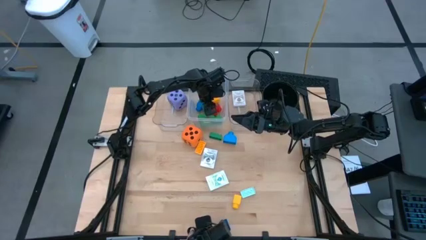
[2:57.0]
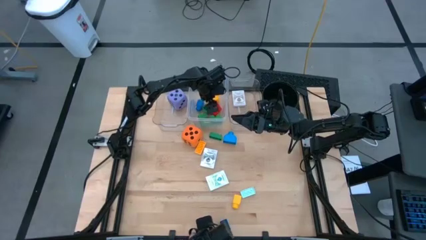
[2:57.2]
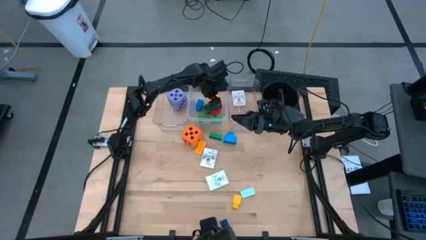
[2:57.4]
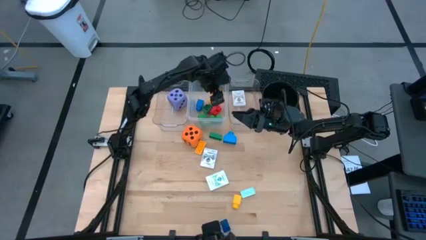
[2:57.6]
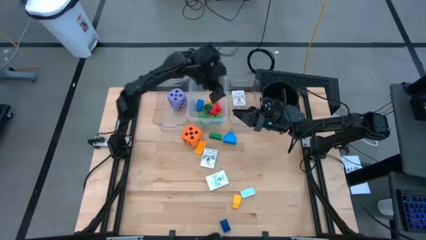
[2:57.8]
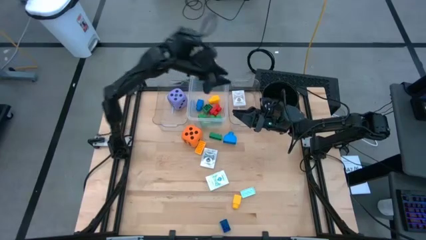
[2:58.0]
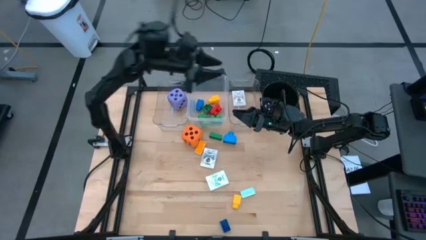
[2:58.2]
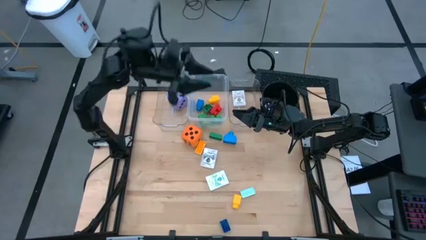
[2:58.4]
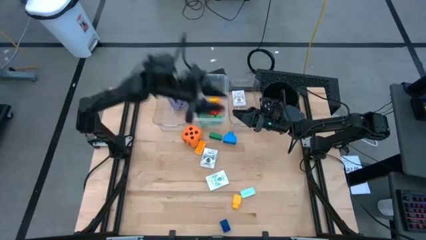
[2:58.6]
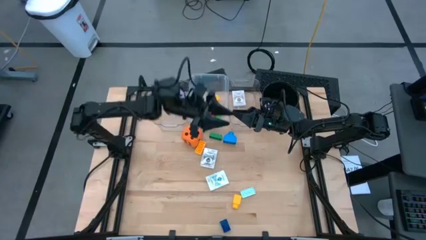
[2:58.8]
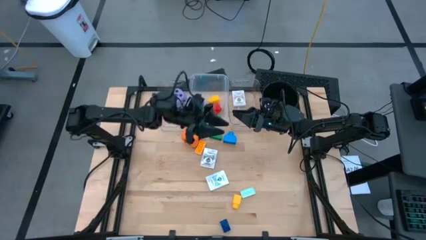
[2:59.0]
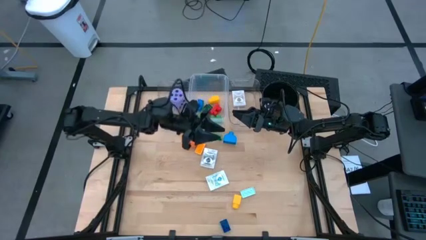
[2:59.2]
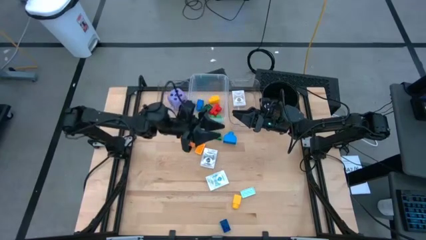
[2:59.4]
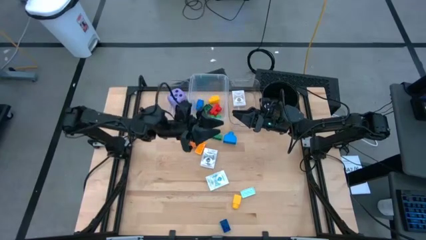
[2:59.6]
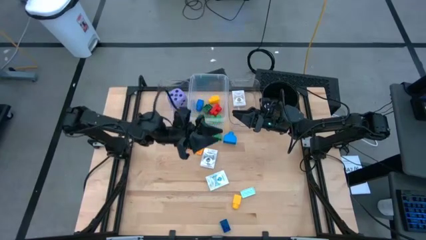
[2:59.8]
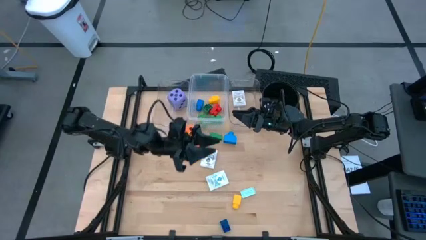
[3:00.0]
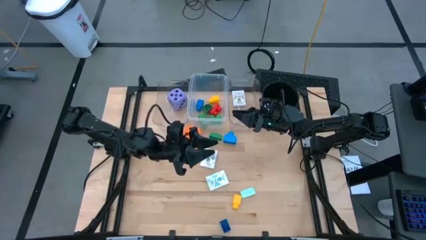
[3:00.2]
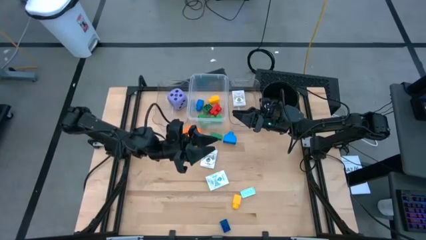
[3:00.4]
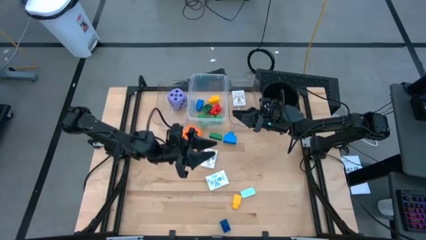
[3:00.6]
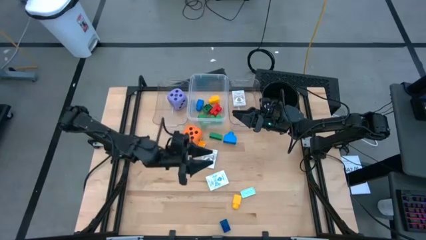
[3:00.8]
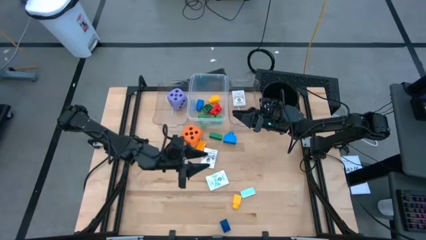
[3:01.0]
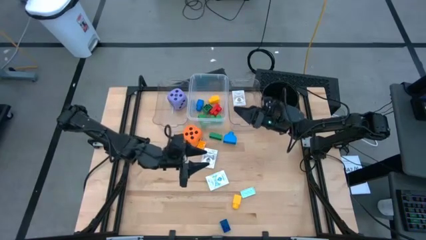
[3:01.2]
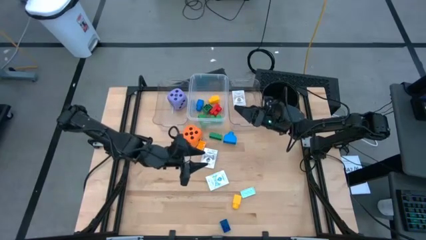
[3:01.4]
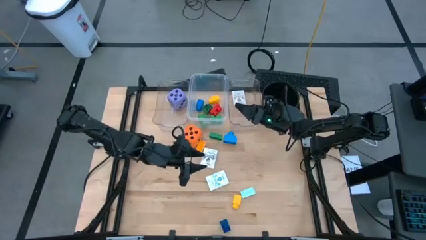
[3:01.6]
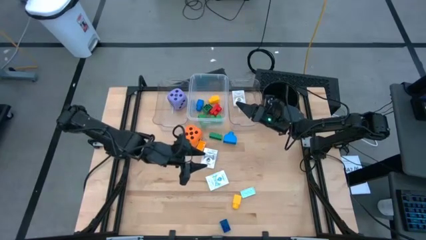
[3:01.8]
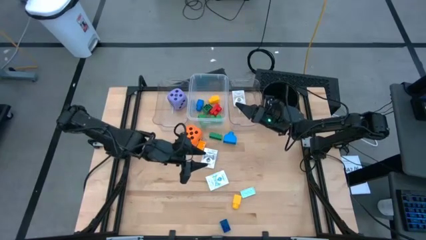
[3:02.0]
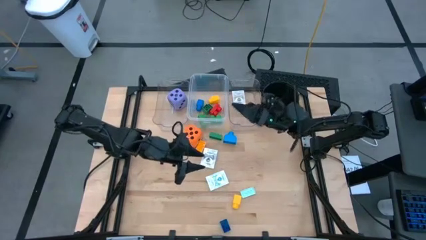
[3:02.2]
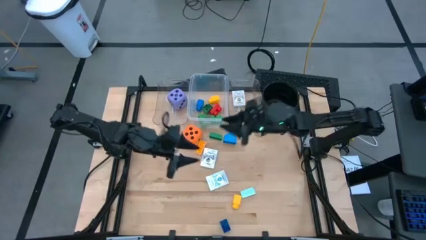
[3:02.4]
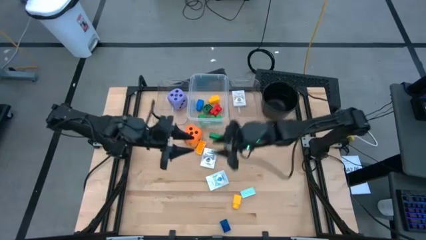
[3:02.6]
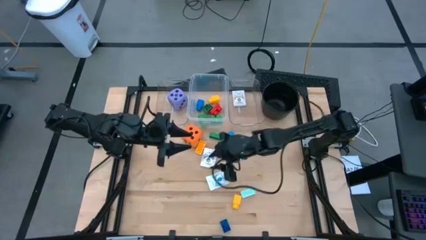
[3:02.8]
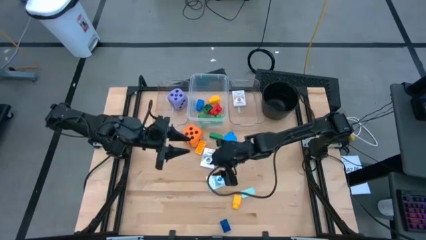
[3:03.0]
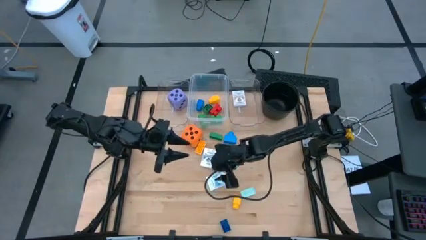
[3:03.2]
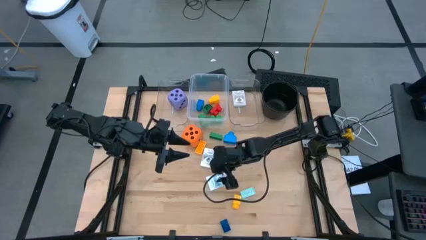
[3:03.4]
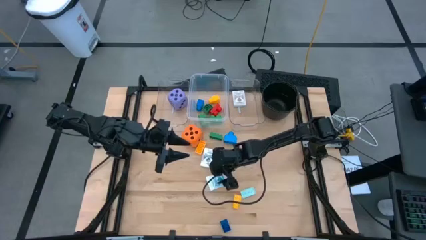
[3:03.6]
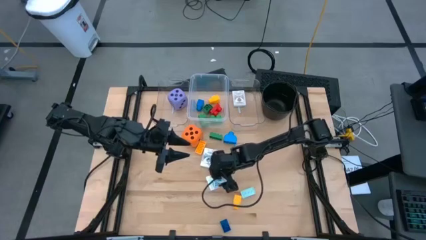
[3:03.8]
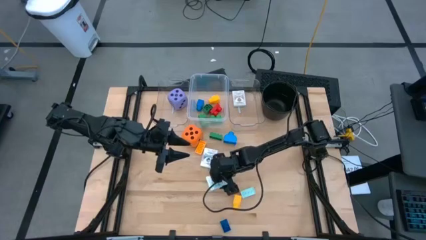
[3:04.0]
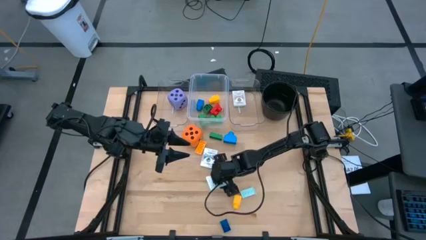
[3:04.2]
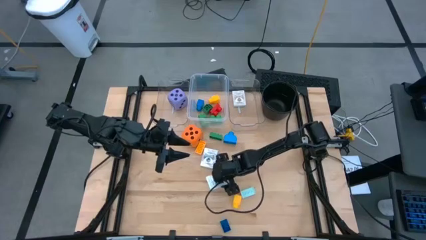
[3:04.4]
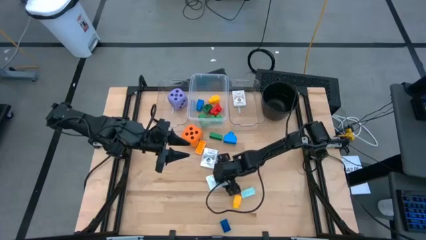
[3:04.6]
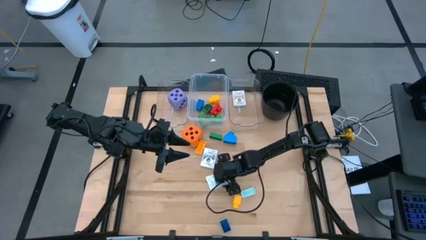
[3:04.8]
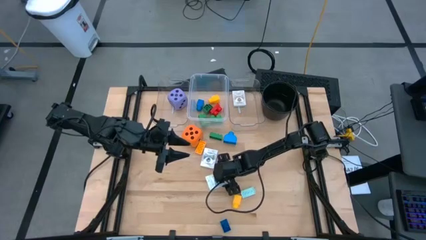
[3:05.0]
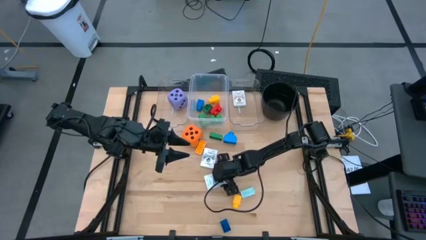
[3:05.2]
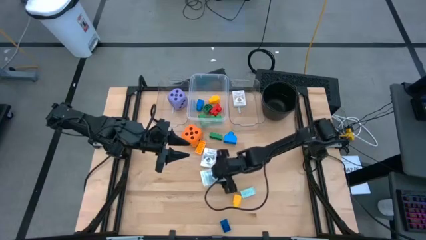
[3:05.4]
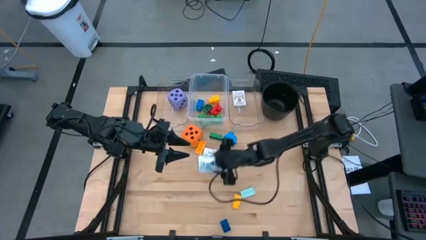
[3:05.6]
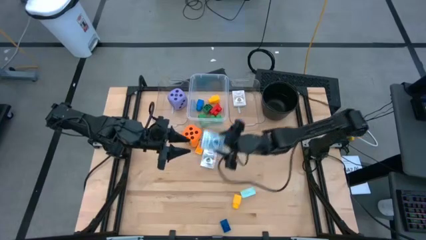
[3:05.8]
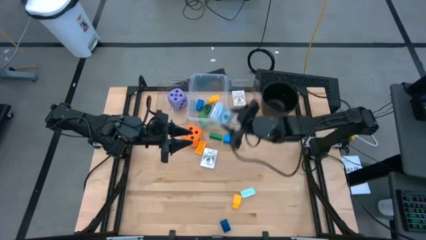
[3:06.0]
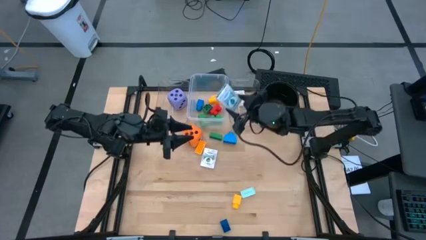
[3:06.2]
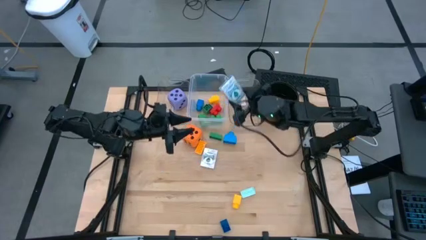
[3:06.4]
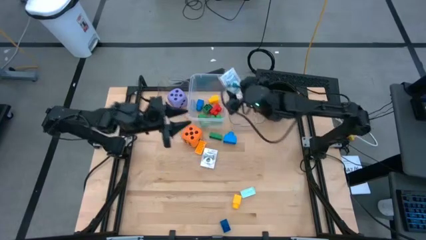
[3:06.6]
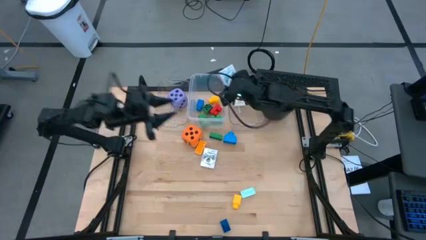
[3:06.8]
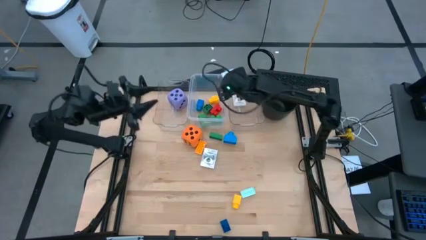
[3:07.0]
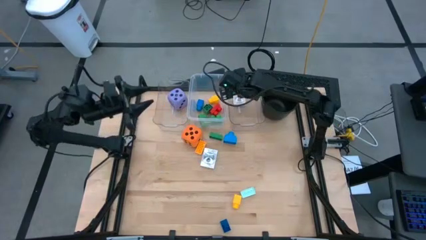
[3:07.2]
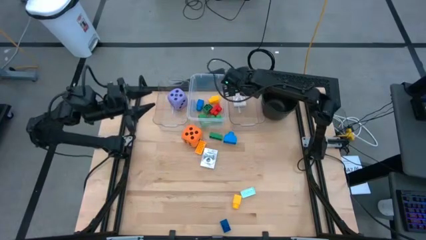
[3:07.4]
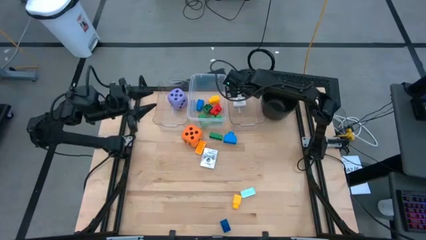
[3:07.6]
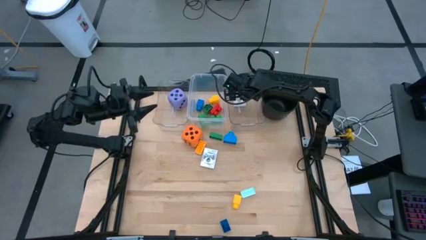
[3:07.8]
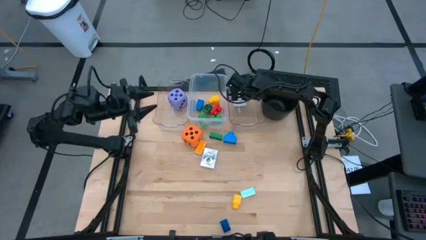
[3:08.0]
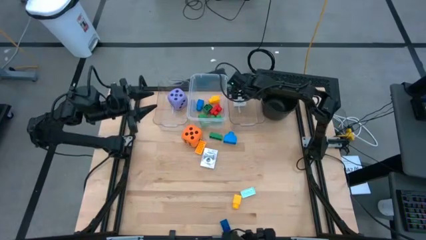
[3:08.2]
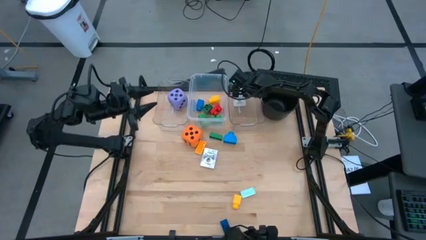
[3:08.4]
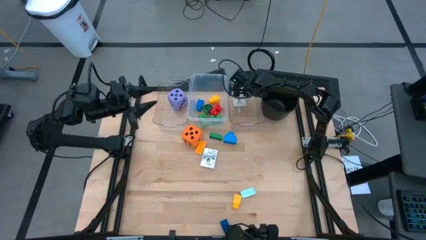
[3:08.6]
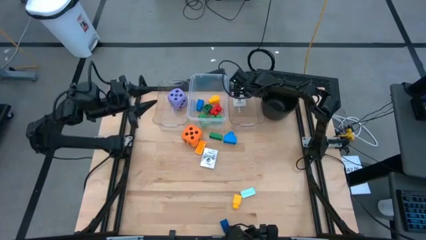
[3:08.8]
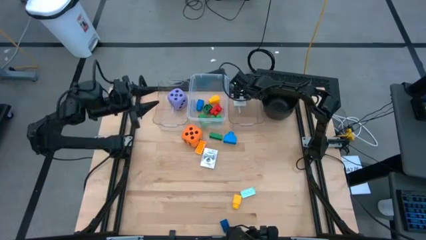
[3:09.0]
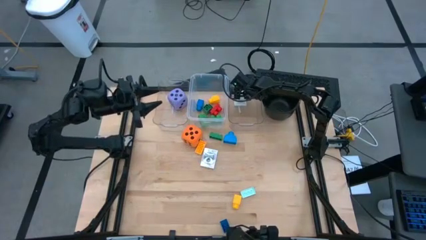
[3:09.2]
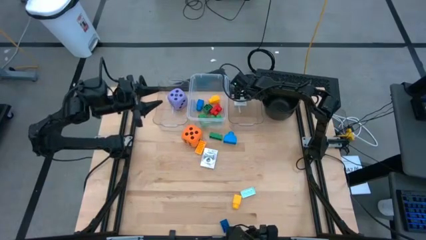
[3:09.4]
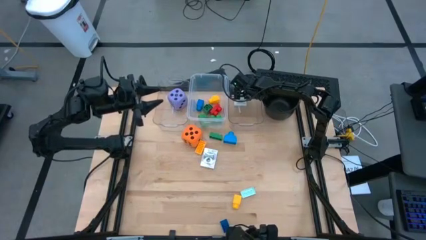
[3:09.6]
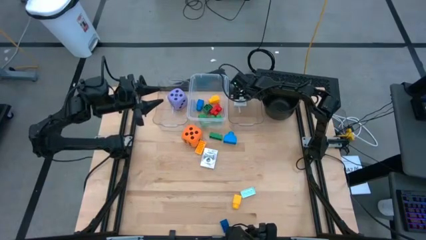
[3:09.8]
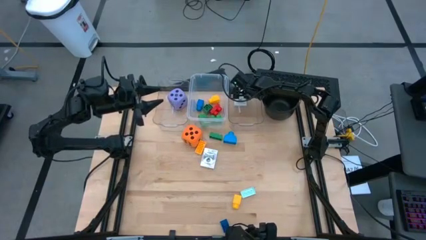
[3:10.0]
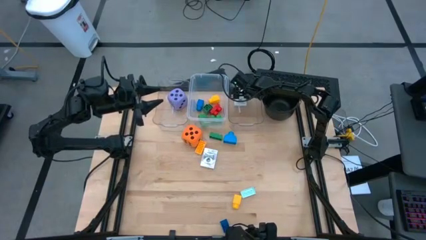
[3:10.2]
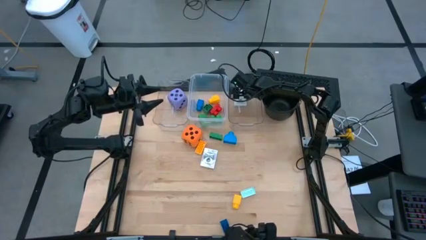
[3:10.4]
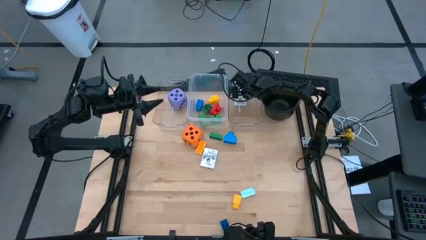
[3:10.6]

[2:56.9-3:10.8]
Task: Pick & Place Toys
Put the blue playing card box into the right transparent bin

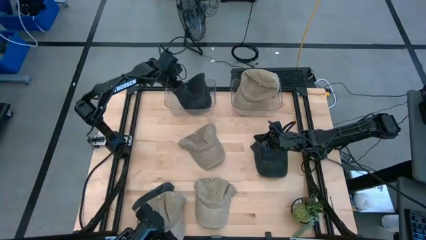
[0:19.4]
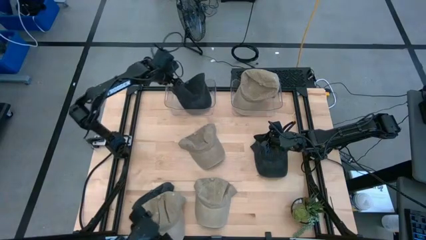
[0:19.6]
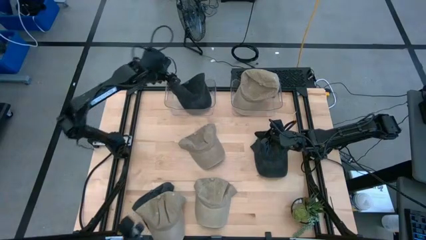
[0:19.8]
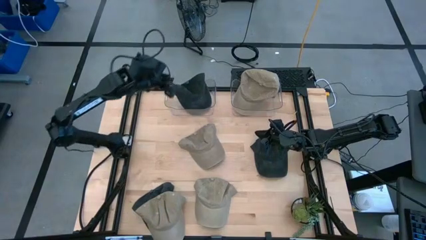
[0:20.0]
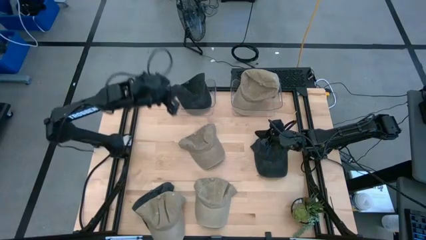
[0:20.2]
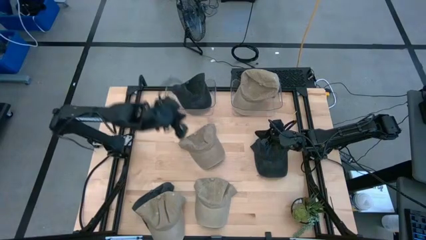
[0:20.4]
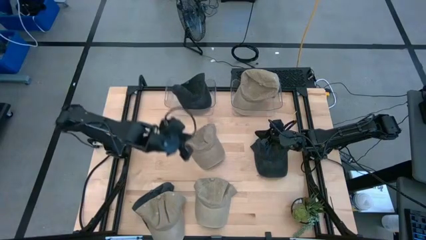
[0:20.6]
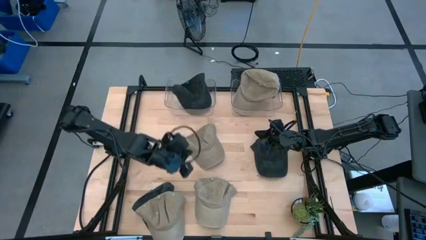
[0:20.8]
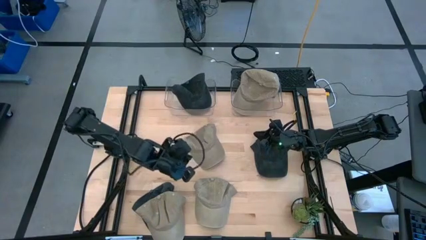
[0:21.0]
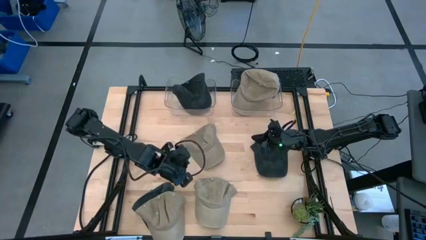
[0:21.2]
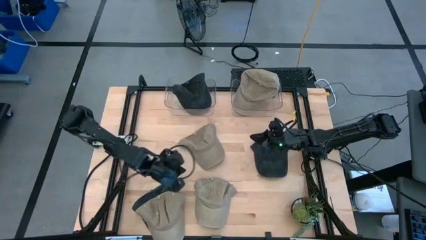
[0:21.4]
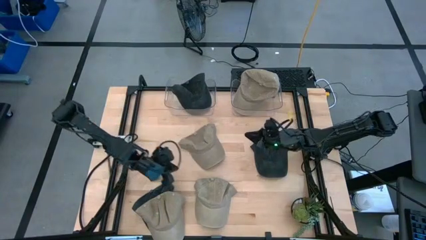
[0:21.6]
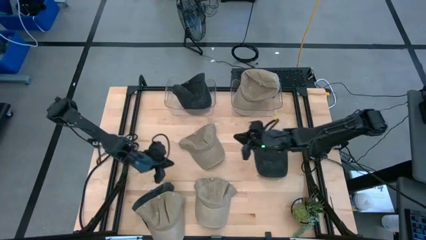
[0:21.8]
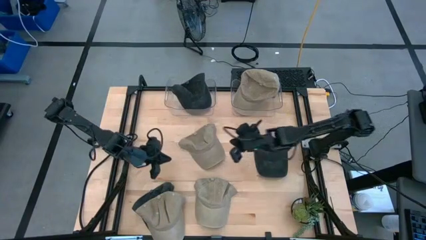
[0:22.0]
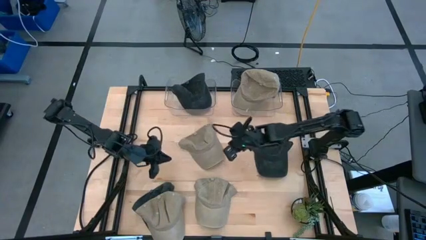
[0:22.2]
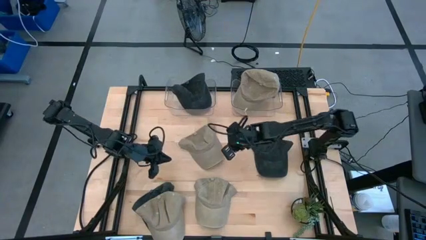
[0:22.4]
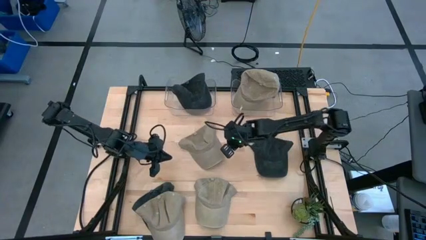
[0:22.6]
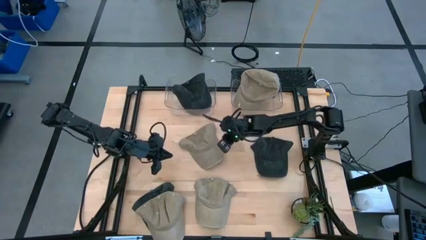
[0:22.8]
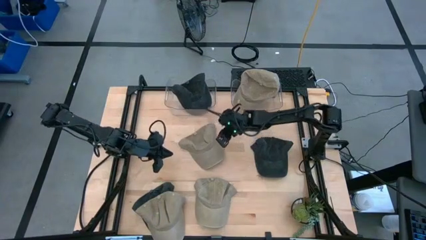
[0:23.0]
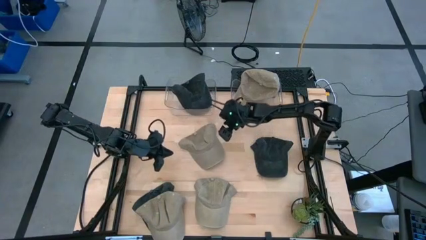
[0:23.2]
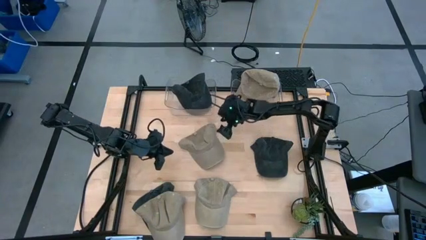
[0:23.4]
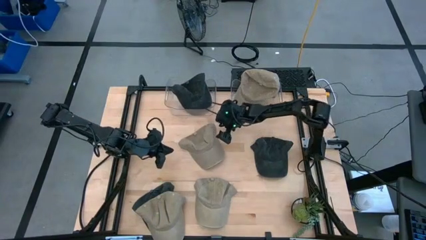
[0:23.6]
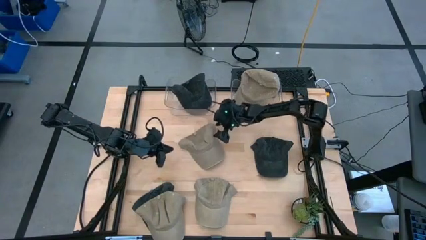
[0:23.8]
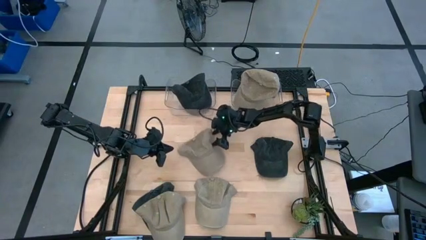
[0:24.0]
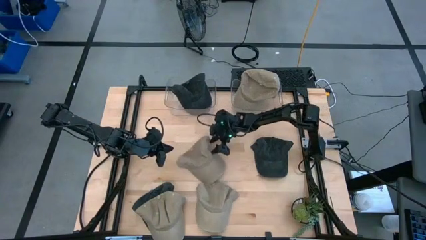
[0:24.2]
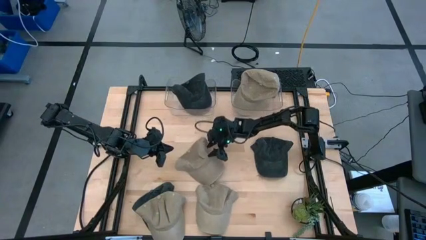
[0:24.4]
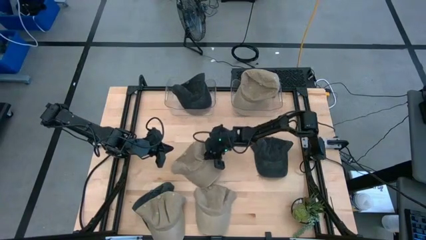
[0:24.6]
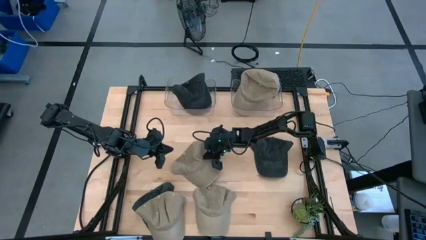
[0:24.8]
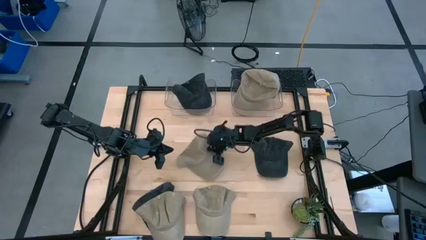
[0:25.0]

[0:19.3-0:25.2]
Task: Pick & Place hat
Put the brown cap into the right transparent bin
